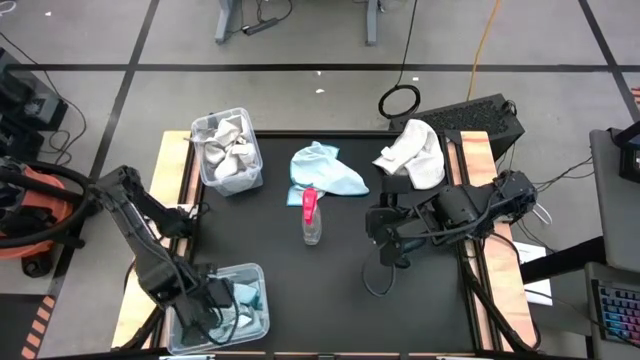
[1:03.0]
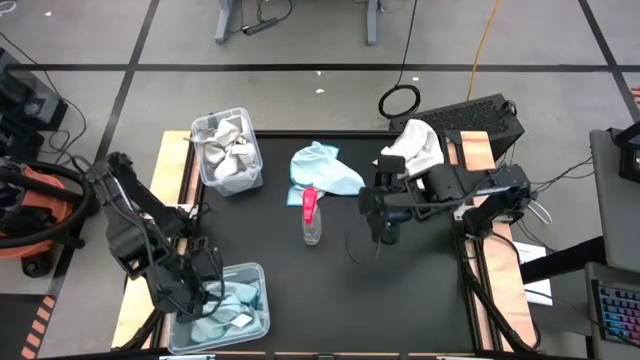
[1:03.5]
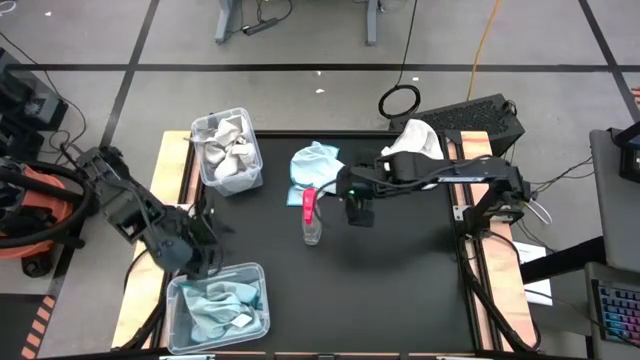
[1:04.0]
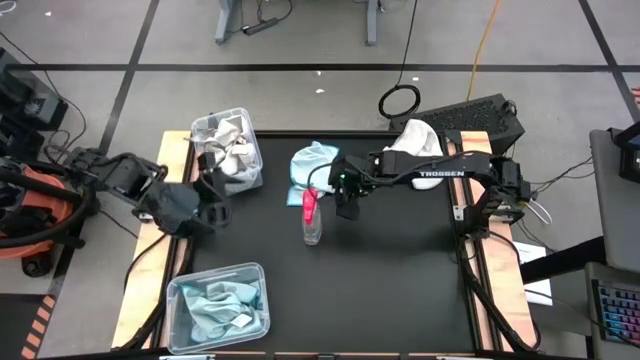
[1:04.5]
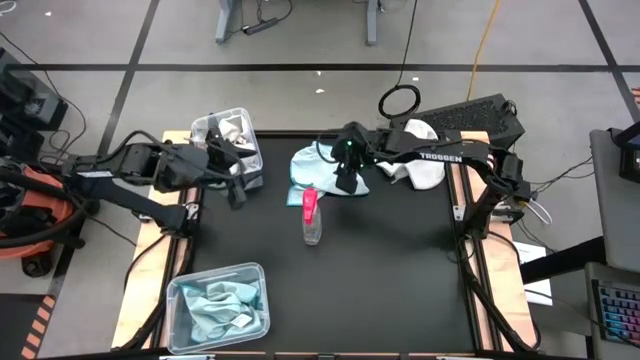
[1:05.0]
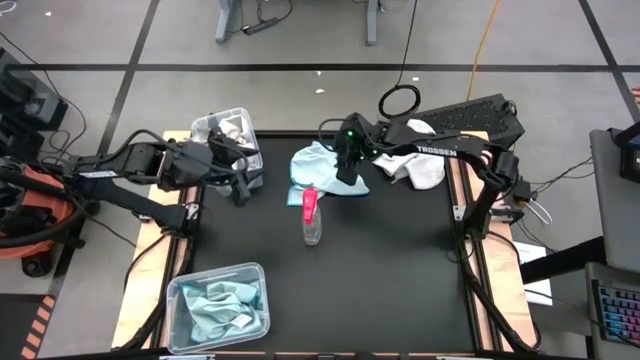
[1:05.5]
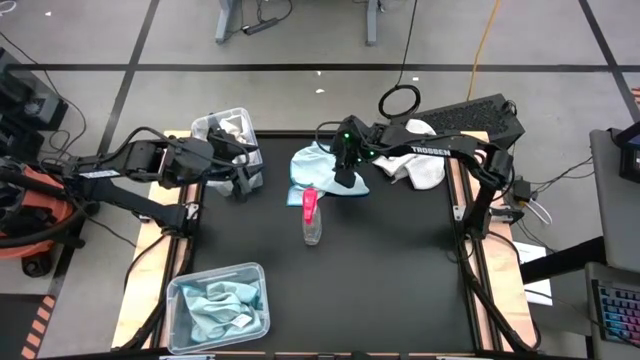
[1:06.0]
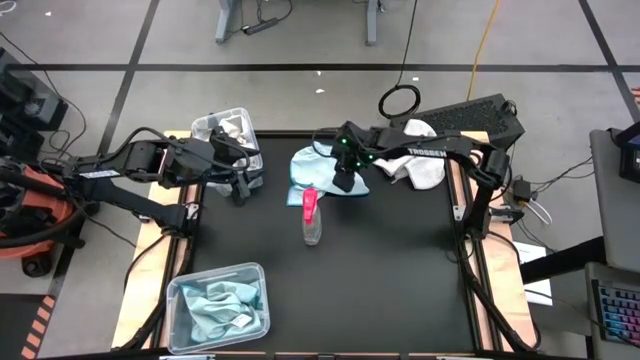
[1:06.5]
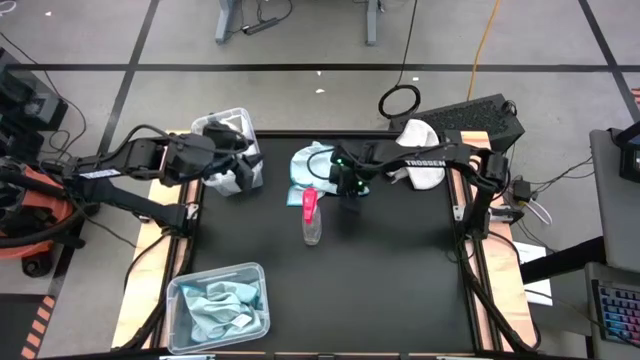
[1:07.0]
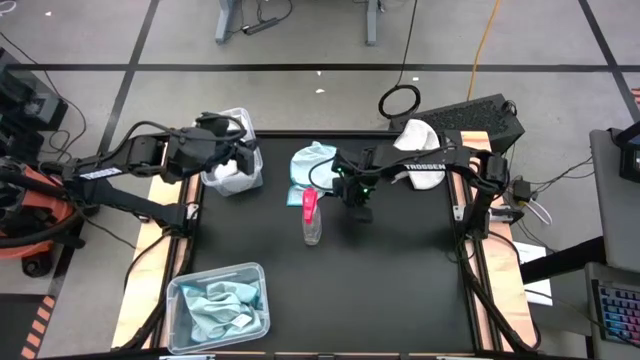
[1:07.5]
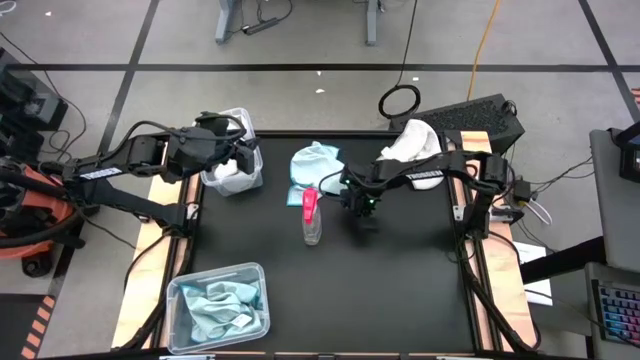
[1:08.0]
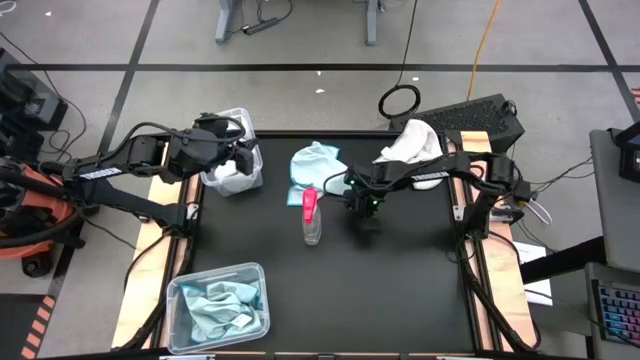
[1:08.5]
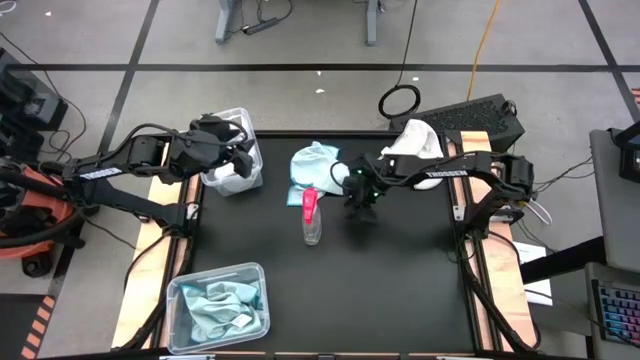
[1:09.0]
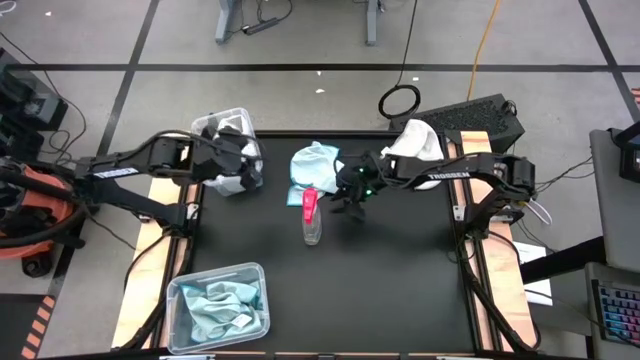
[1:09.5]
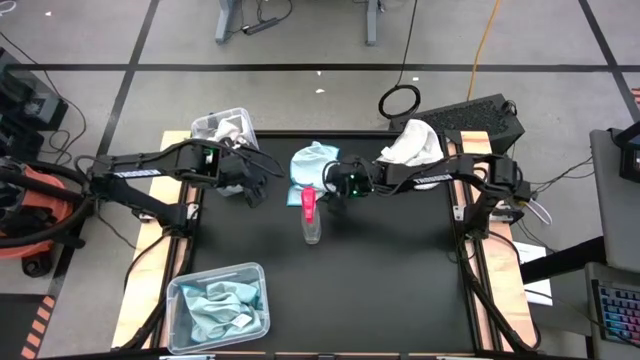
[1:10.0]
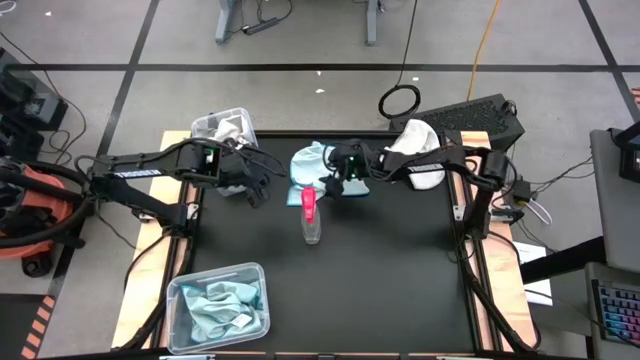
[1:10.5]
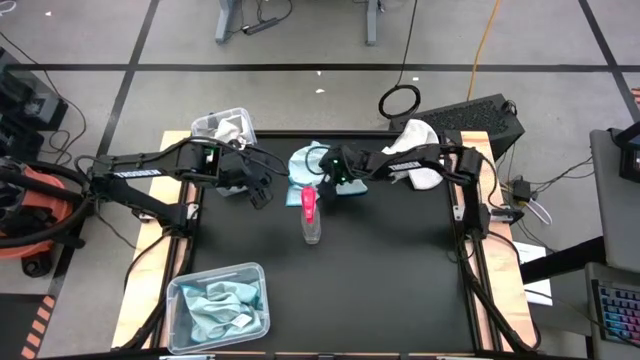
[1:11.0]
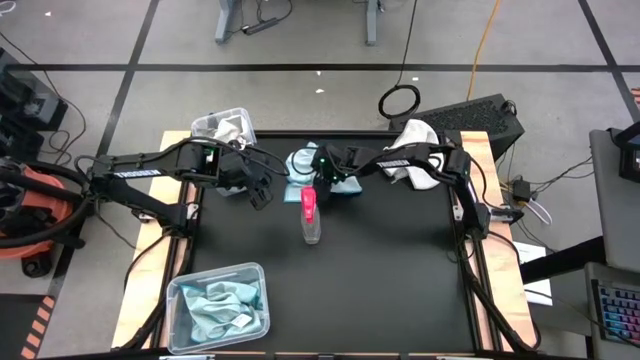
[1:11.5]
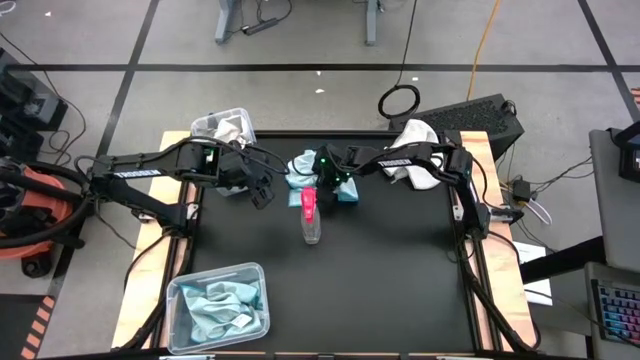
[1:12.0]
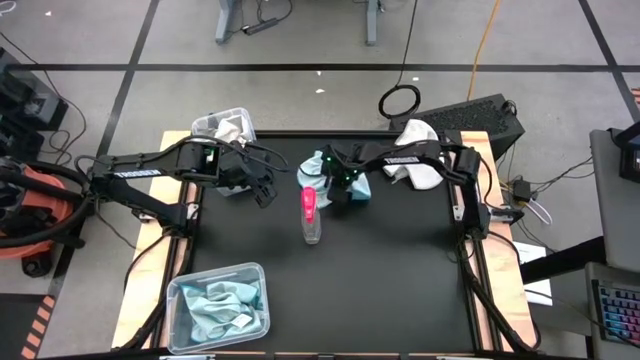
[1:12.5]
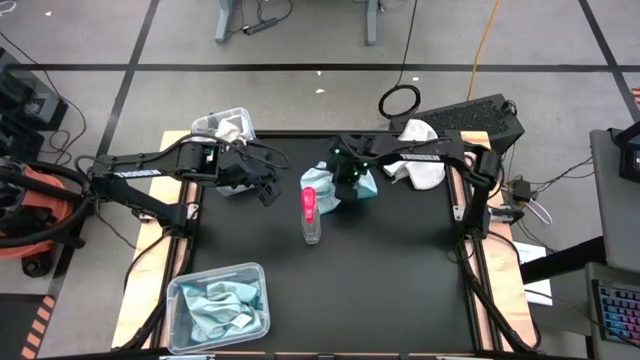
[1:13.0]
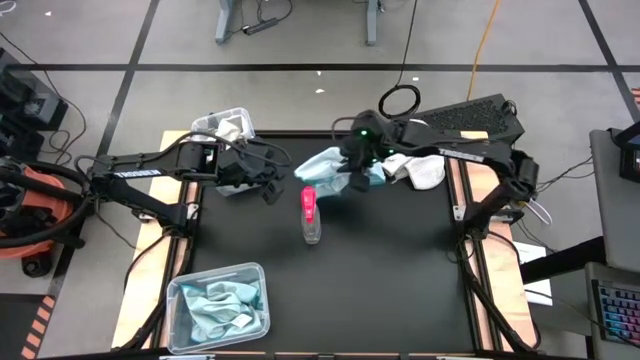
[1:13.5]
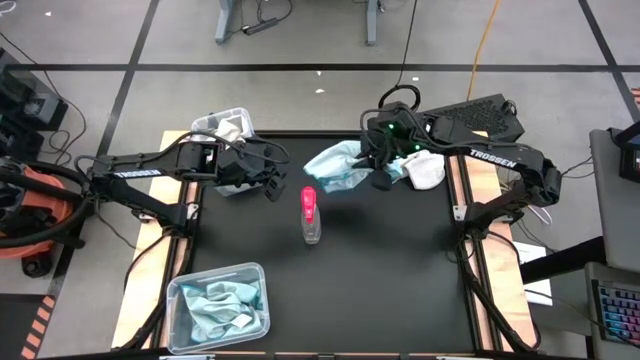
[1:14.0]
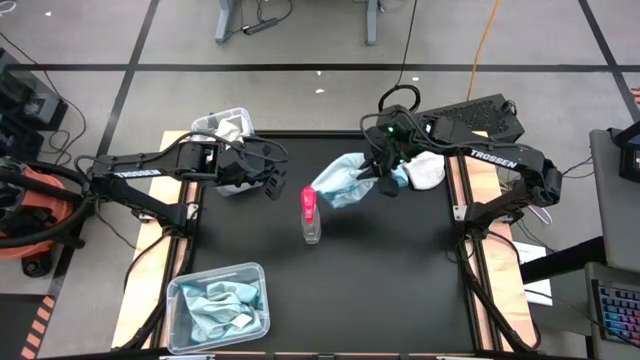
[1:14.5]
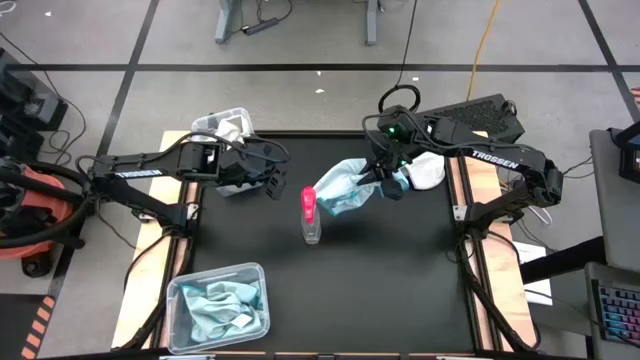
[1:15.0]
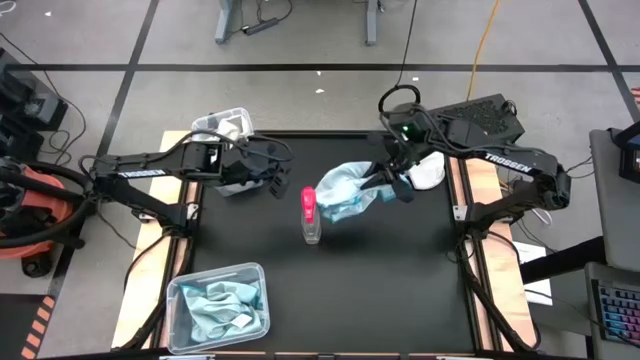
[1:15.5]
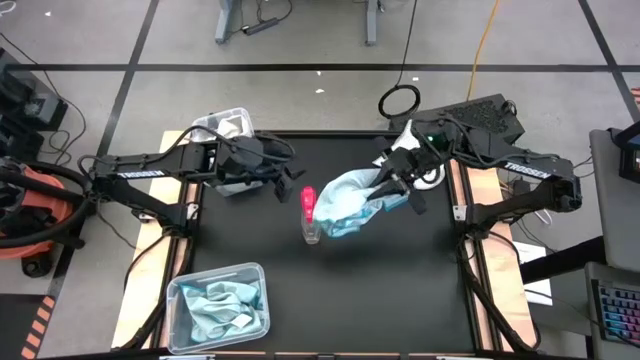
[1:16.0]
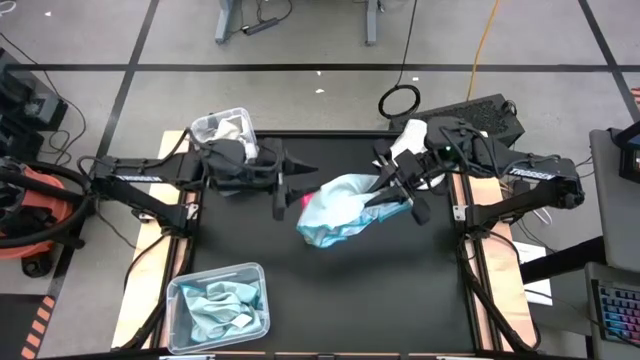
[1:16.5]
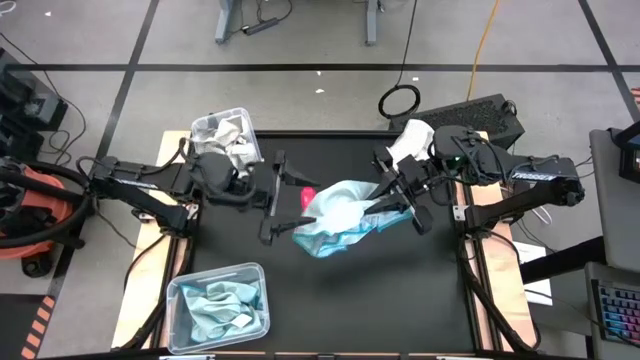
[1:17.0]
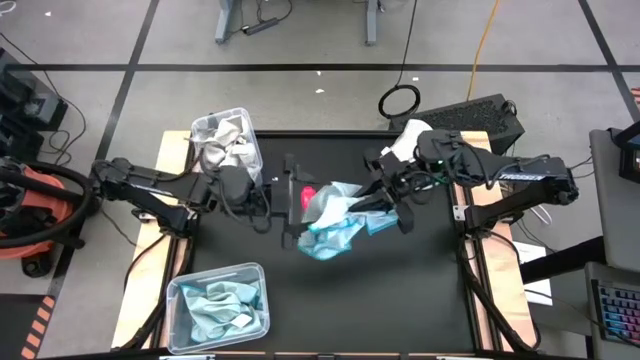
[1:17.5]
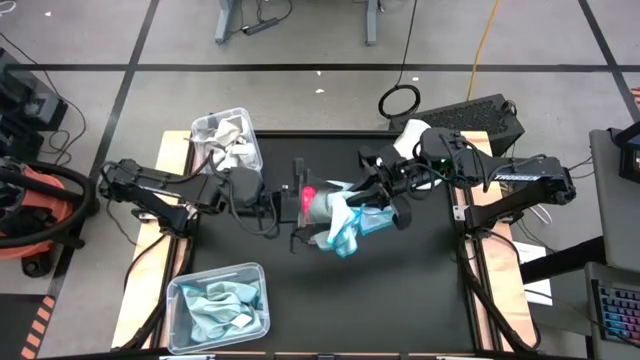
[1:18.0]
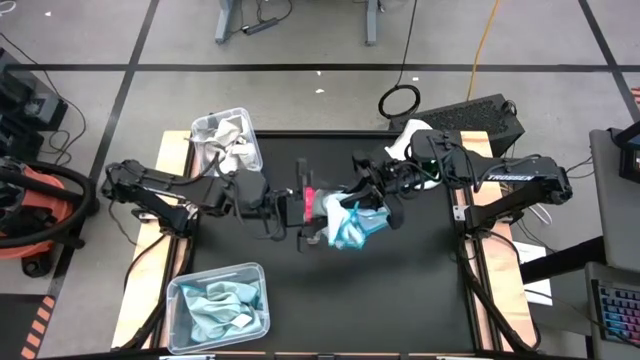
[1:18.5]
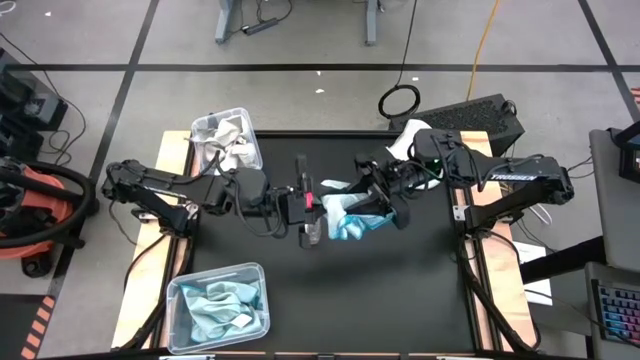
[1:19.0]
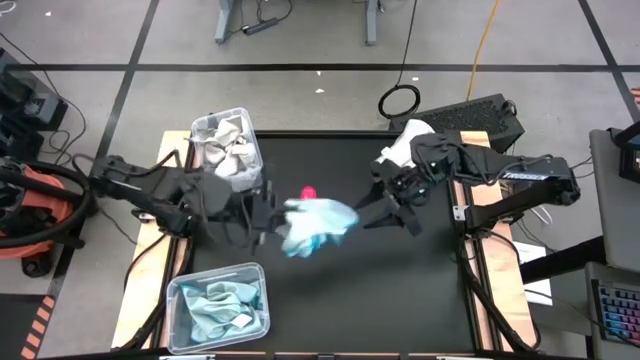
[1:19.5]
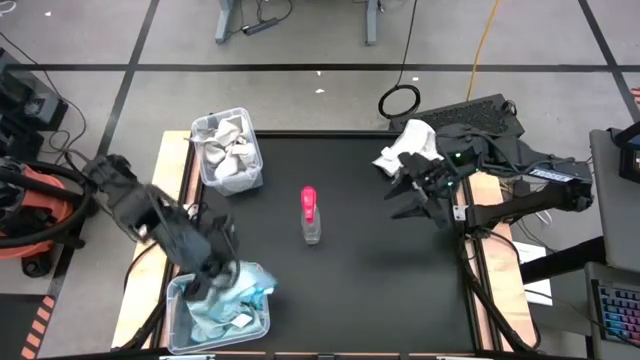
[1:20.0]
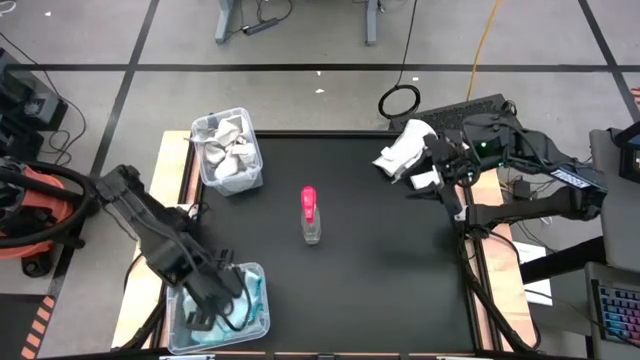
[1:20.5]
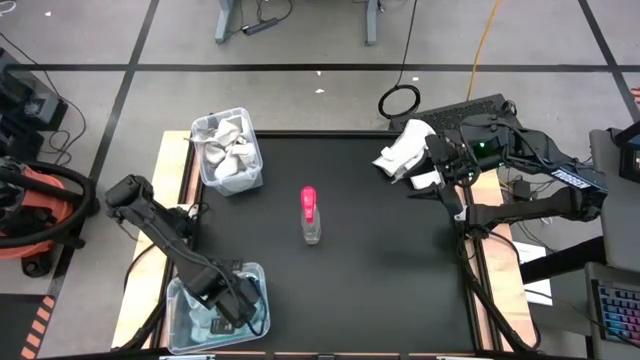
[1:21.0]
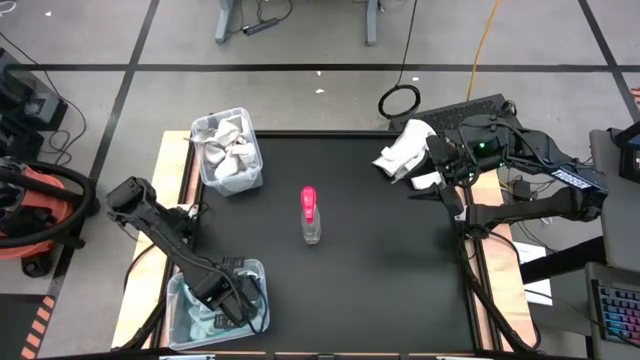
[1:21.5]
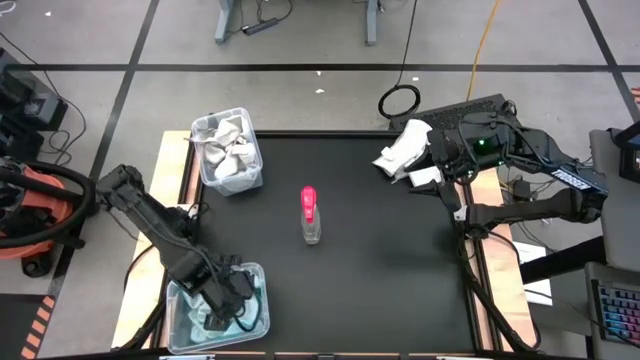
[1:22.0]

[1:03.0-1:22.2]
Task: Sort microfiber towel by color & place in baskets
Put the blue towel into the bottom transparent bin
